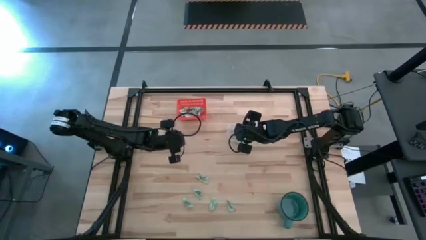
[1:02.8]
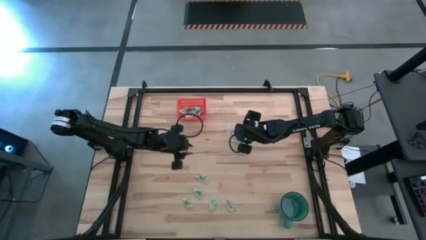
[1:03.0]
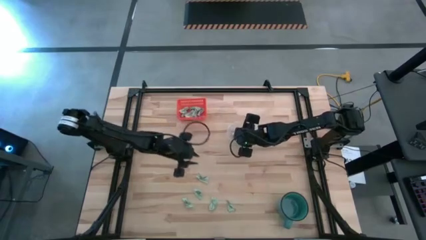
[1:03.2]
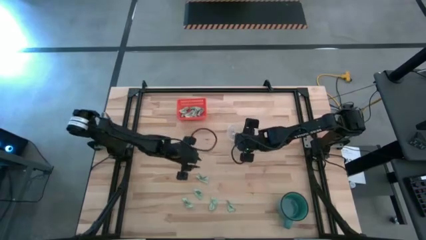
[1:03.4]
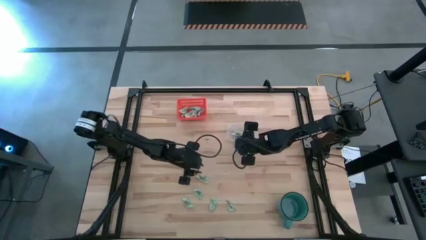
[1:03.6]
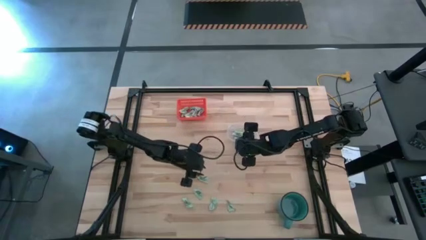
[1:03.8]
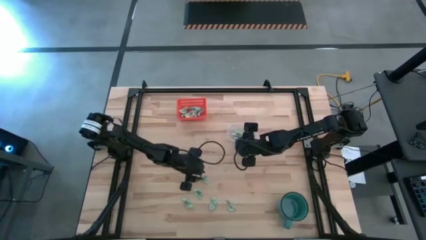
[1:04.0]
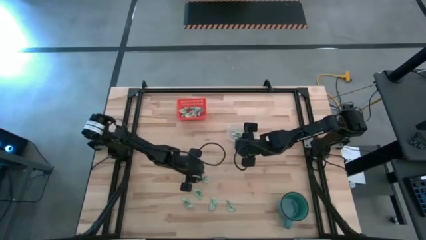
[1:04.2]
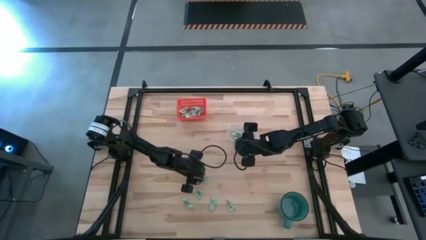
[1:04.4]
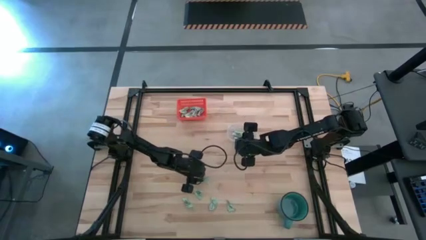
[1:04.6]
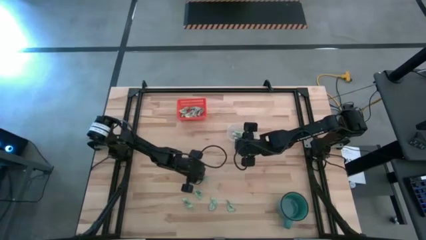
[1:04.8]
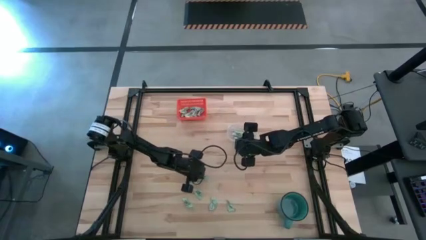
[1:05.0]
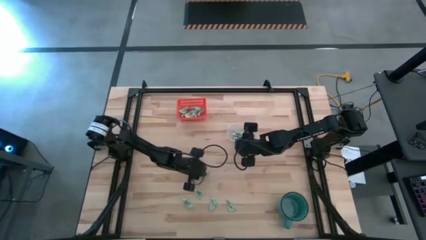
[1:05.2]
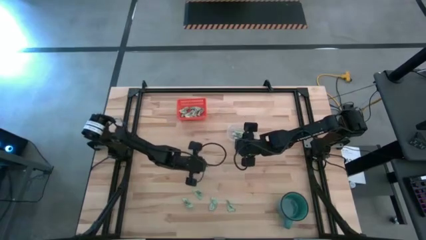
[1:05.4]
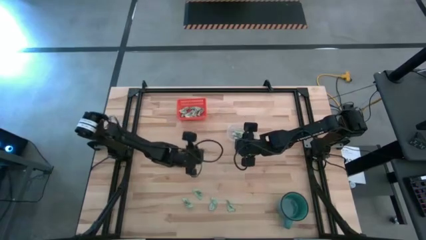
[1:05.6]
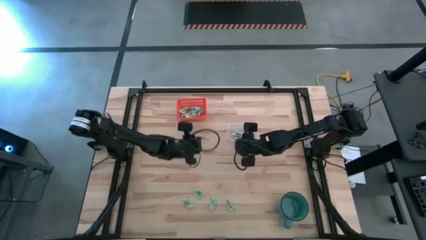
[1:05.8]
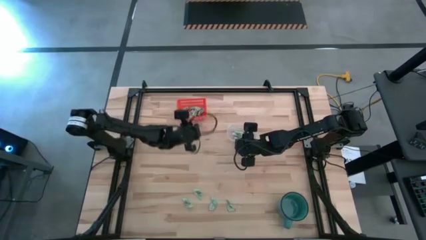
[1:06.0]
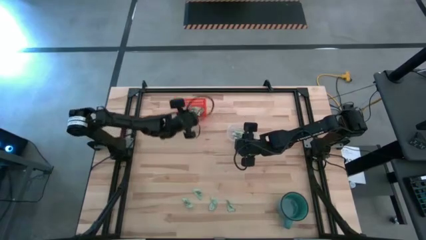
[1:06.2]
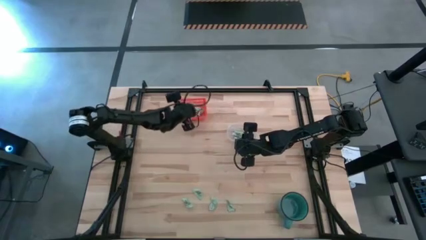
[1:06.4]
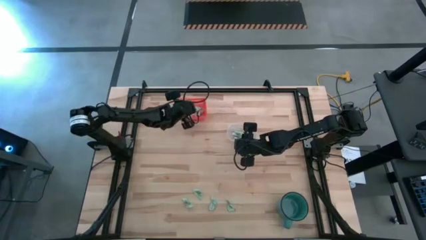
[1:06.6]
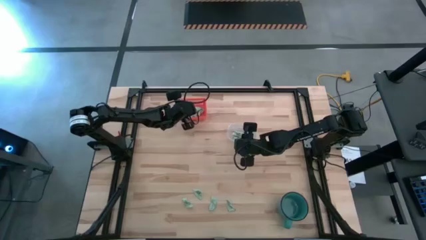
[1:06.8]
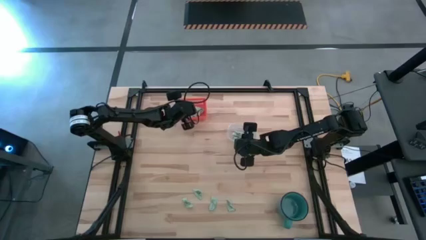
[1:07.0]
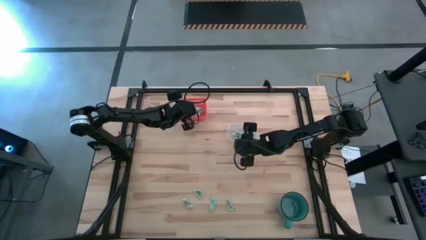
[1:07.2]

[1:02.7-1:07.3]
Task: Pick and place items into bin
Put the green stevia packet into the orange bin

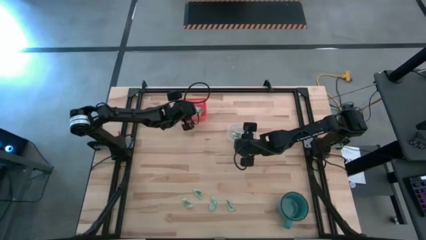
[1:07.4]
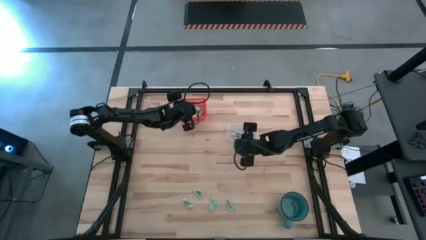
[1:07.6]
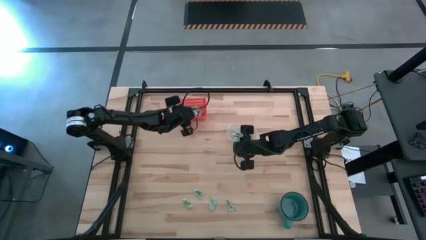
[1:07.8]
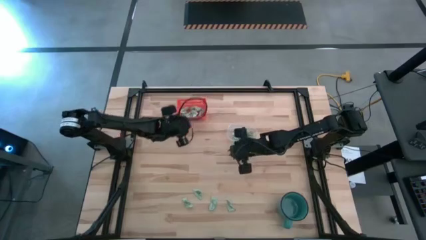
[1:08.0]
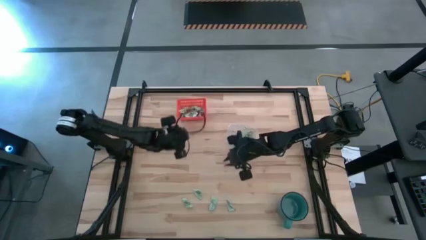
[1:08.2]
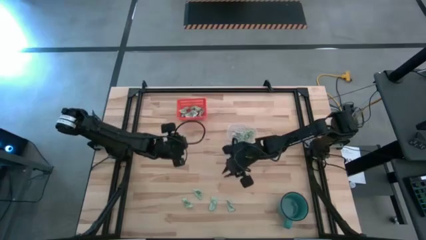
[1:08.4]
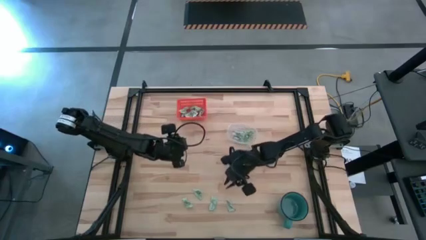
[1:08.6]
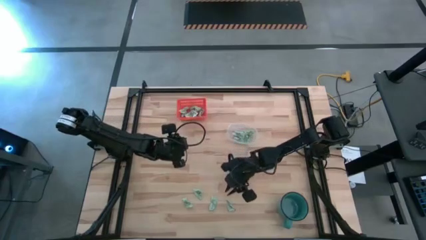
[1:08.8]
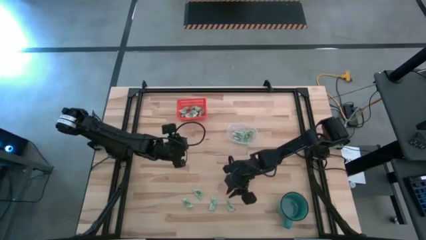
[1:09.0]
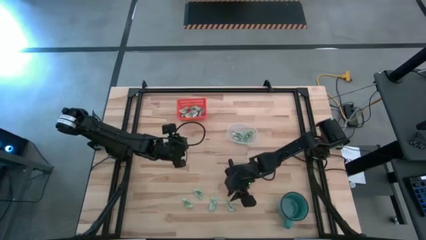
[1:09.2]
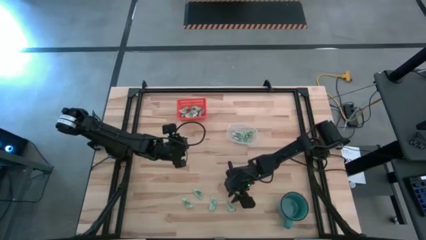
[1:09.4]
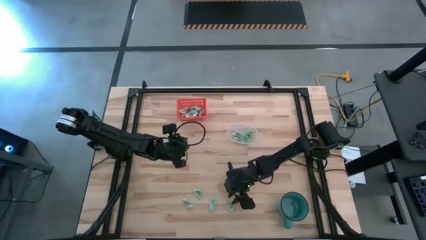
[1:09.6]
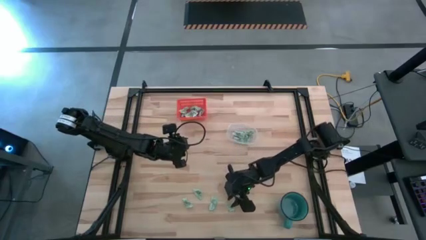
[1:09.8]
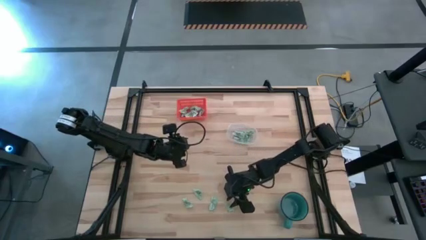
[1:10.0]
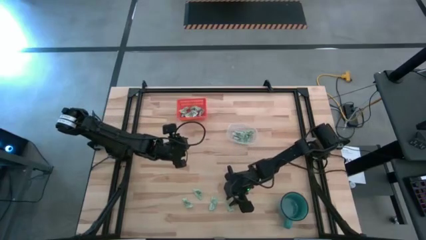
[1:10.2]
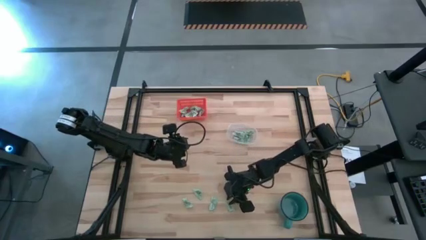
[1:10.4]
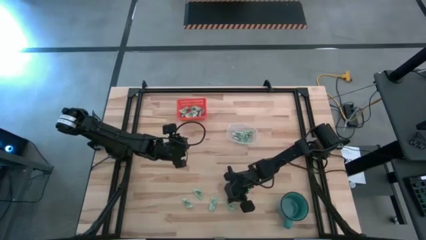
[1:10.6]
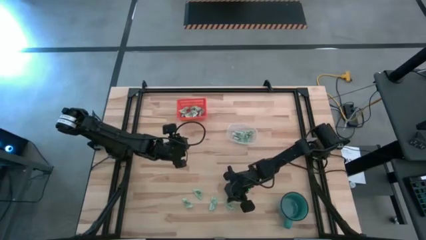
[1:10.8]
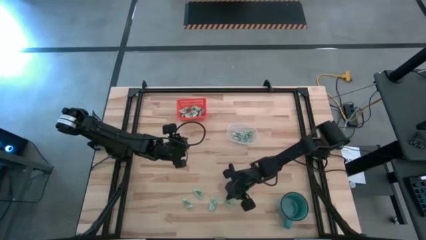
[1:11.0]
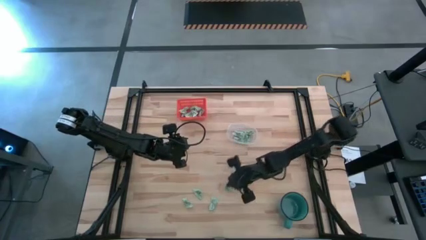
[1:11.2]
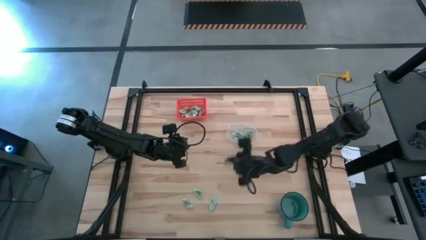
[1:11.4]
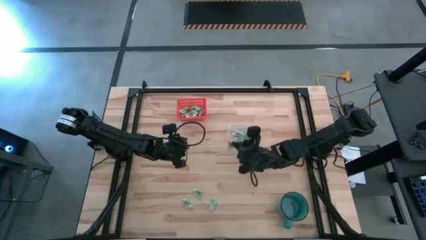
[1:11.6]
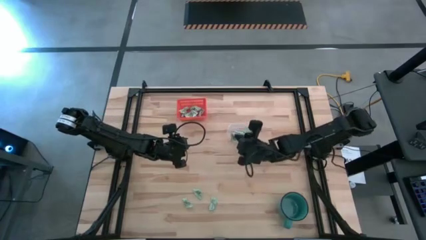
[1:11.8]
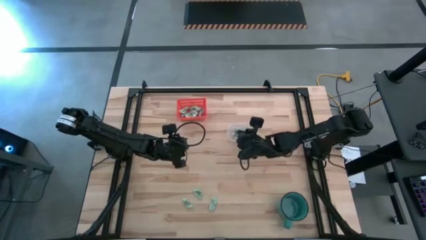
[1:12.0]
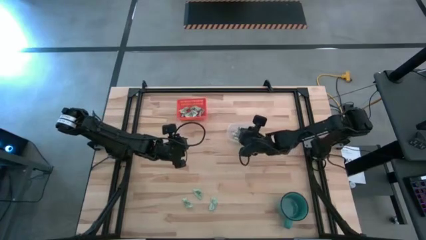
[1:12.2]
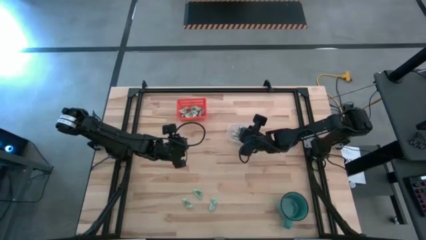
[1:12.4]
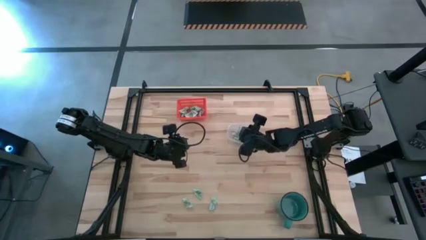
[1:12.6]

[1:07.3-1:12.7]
Put the green stevia packet into the transparent bin

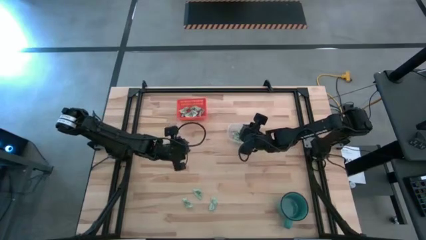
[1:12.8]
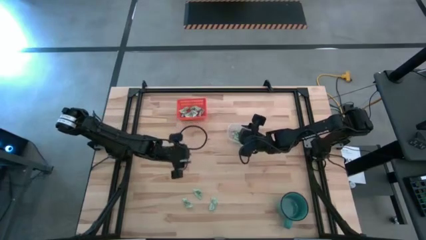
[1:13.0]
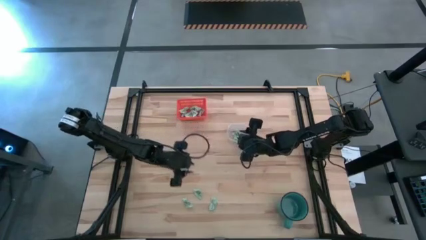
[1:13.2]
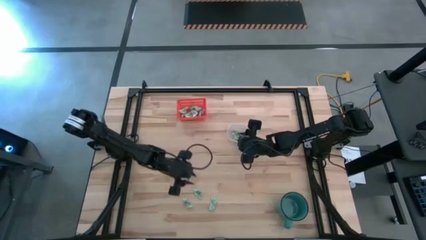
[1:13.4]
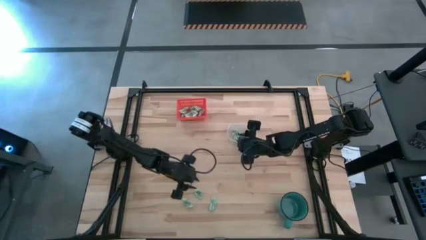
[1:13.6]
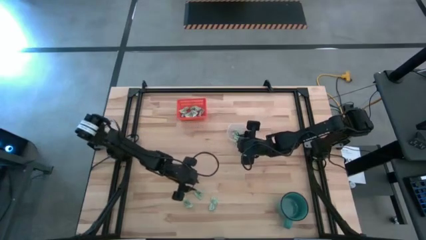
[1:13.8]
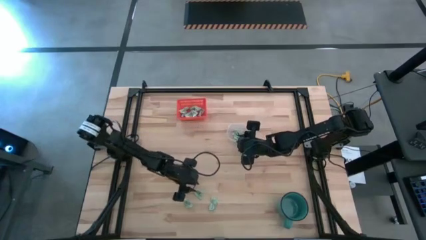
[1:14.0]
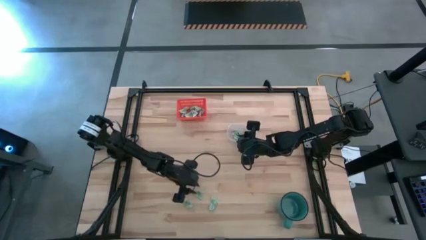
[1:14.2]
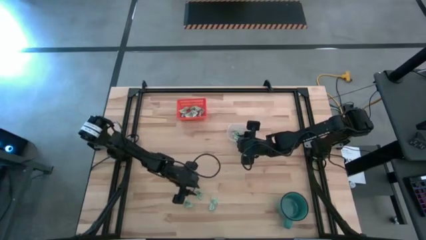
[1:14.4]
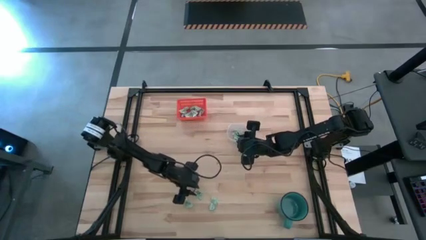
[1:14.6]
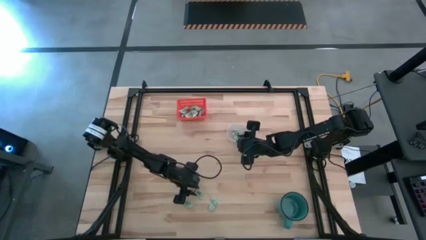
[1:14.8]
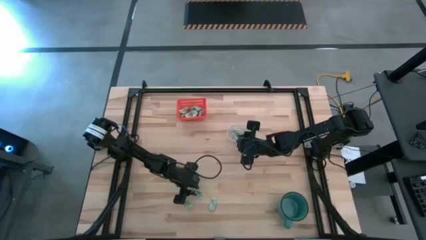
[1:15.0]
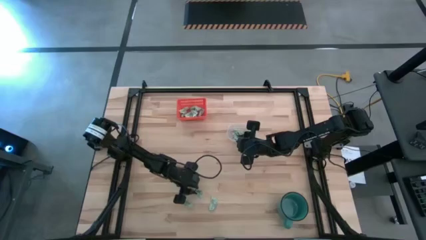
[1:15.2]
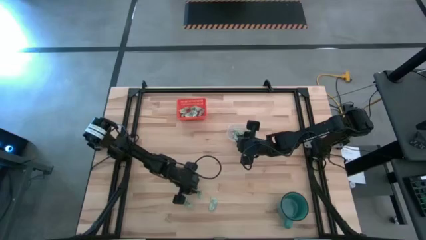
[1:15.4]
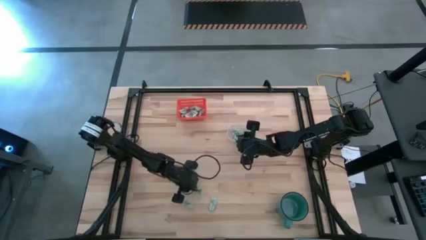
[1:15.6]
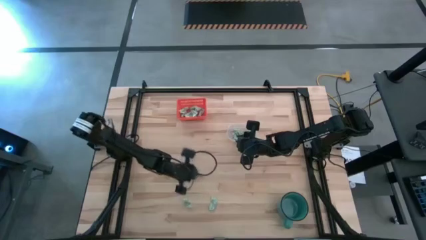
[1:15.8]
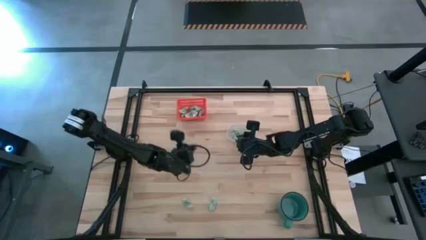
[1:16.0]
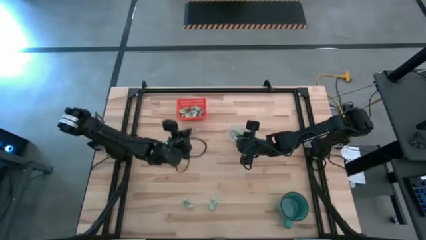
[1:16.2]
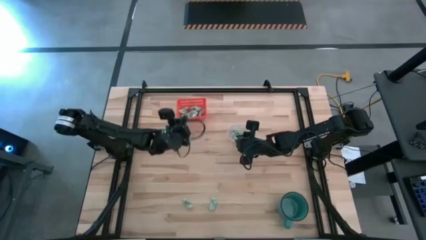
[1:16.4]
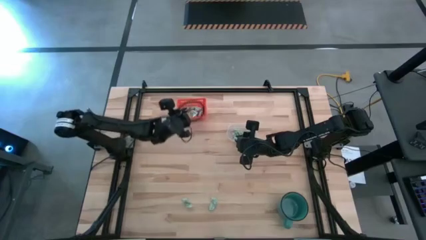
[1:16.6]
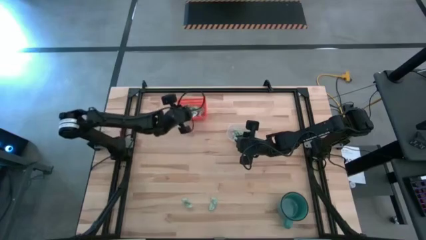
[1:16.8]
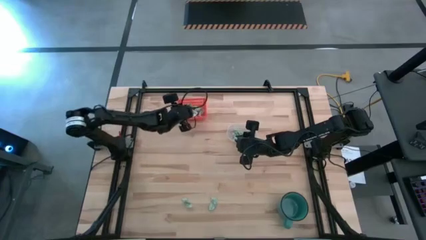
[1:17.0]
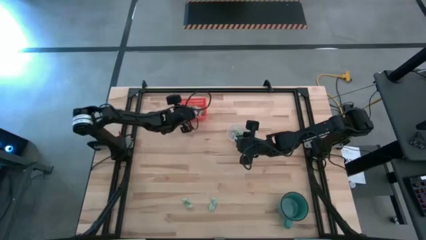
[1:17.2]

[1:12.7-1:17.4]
Put the green stevia packet into the orange bin

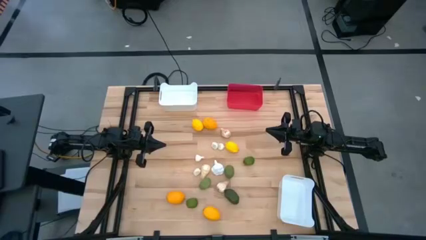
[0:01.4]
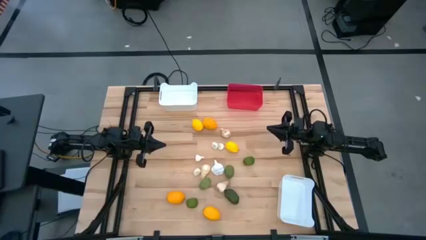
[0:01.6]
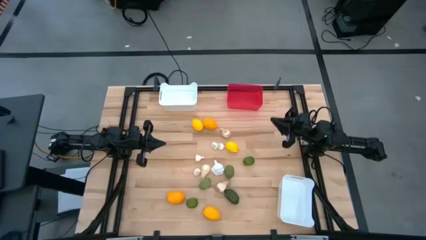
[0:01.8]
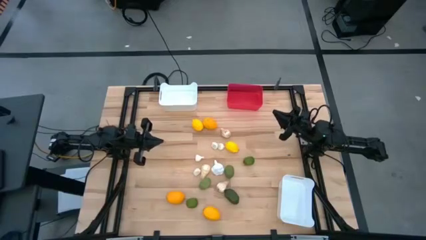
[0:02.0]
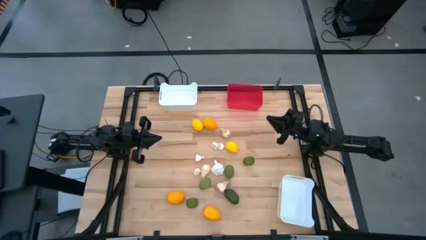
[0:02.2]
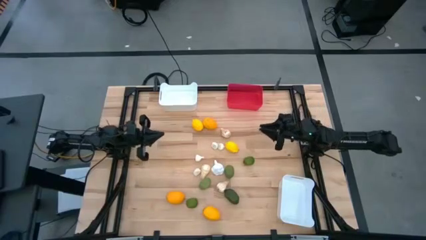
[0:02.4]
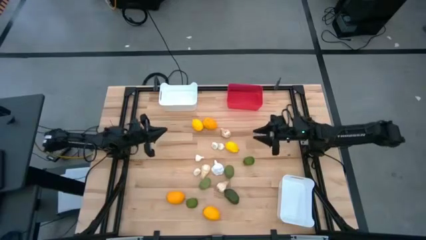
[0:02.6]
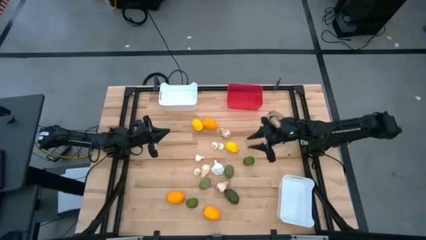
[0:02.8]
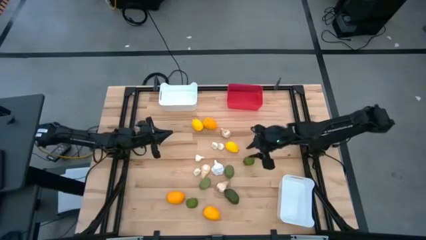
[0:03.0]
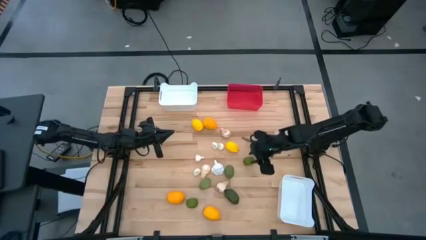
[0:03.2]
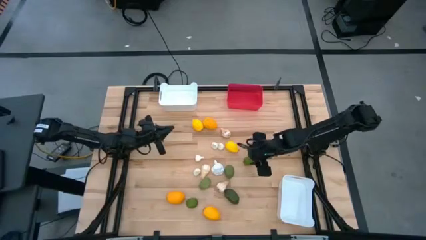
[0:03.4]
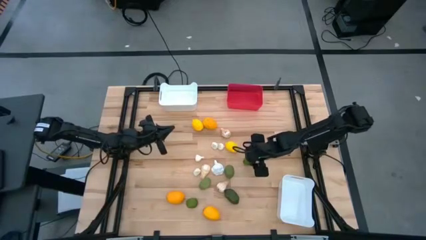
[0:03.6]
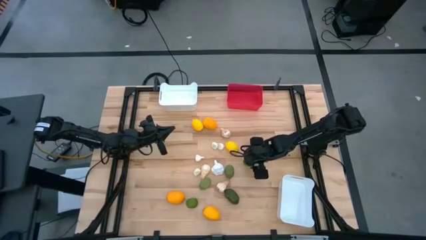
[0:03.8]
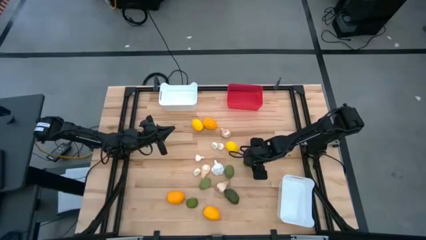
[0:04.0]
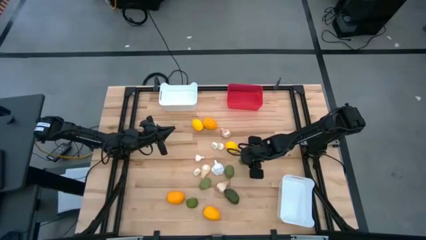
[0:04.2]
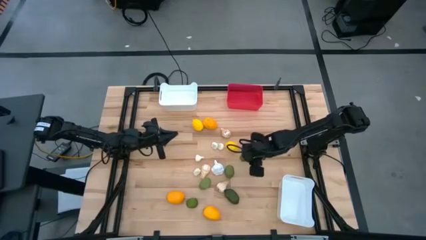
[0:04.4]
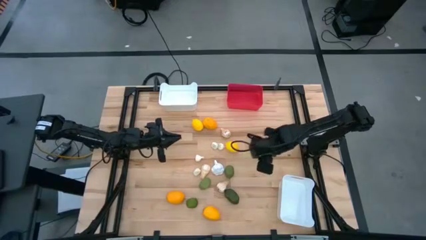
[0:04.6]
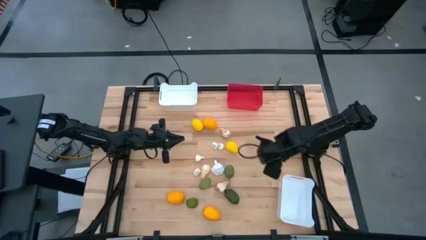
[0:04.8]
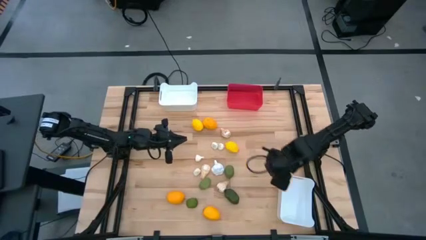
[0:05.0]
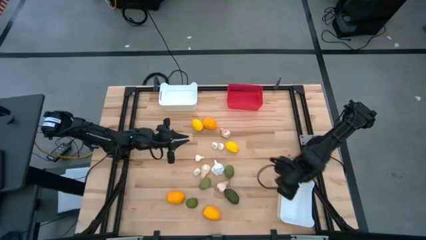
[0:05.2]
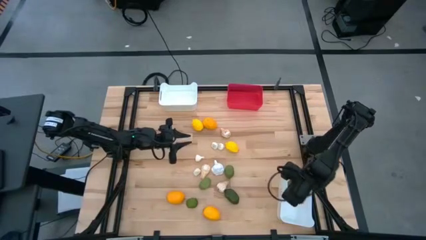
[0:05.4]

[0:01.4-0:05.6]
Task: Sort produce into baskets
Put the green lime into the bottom white bin
